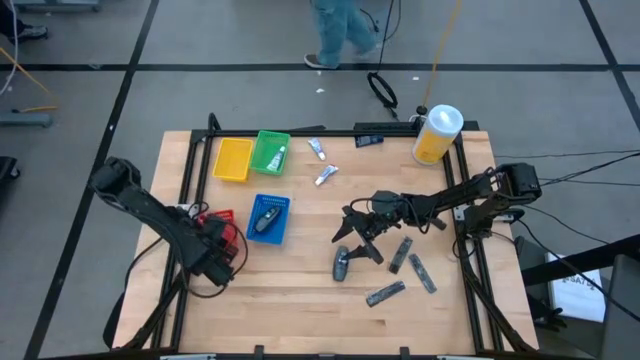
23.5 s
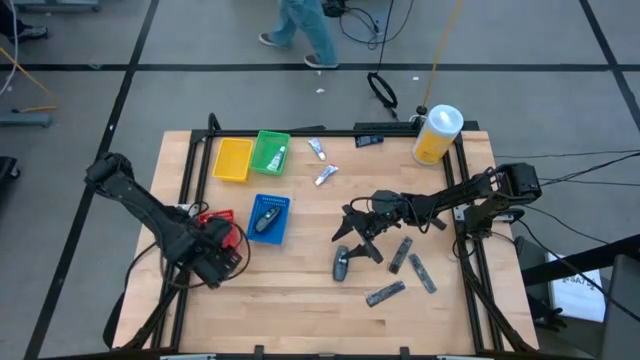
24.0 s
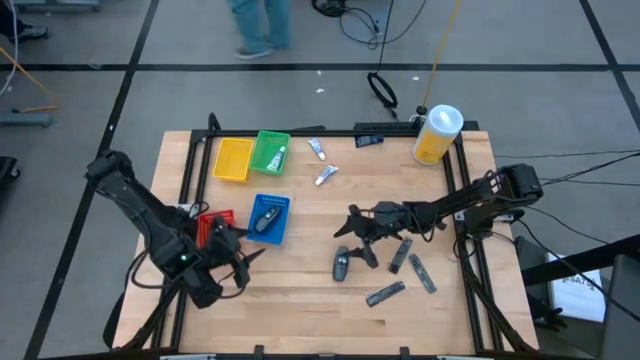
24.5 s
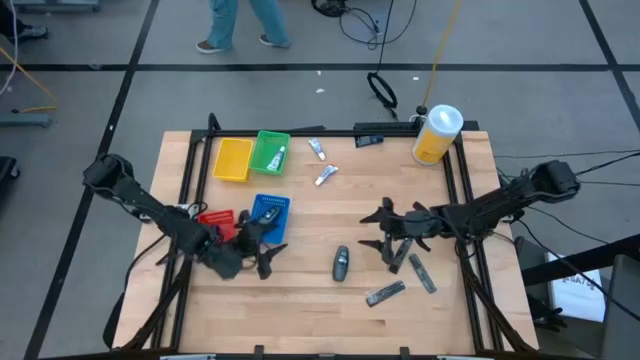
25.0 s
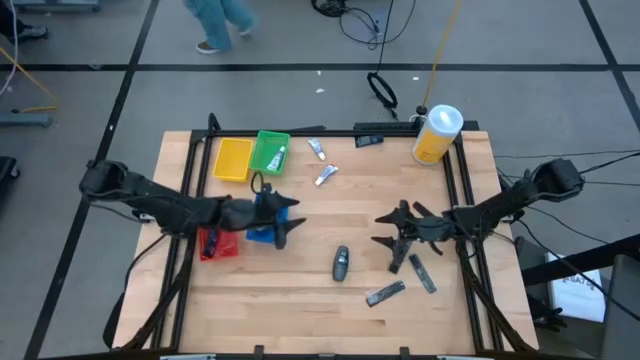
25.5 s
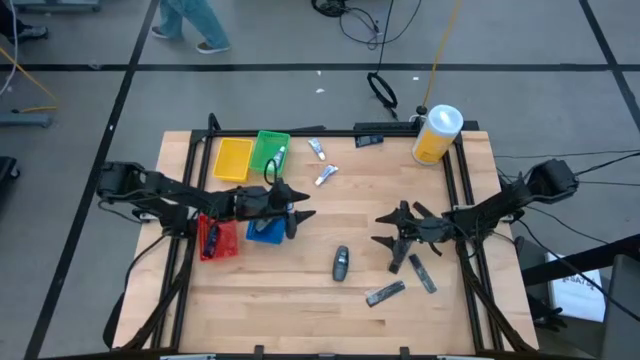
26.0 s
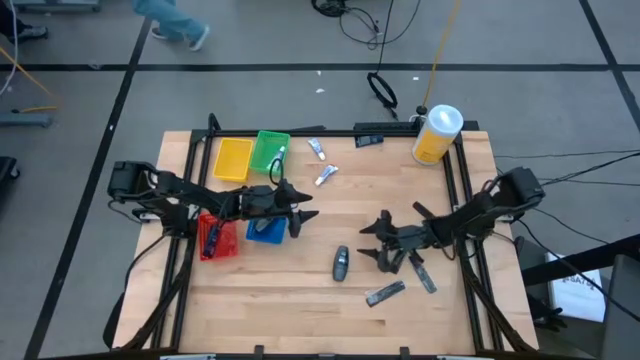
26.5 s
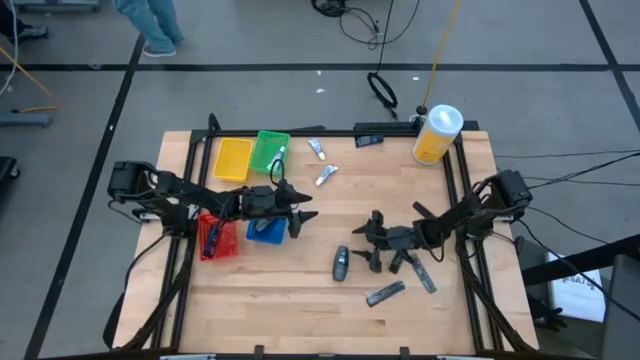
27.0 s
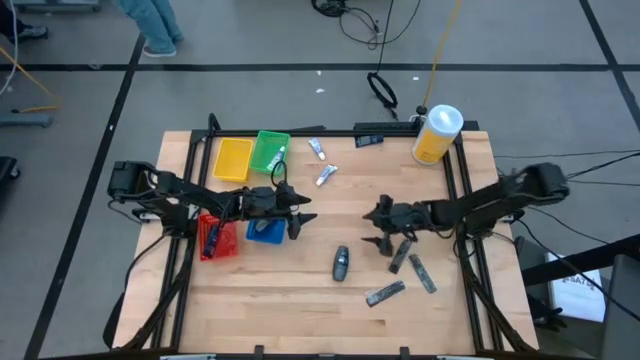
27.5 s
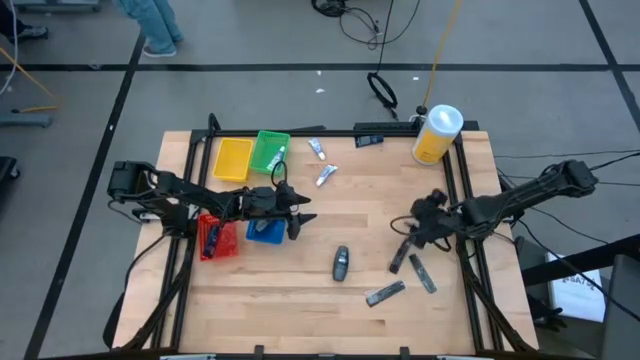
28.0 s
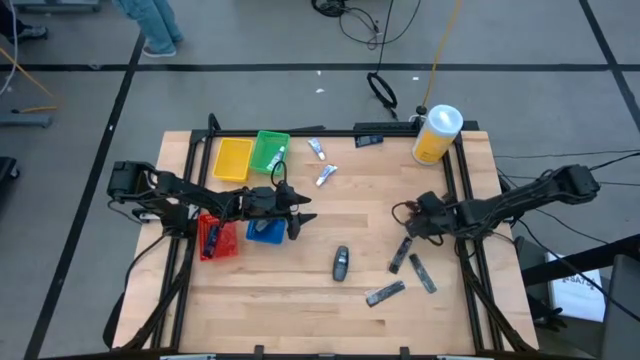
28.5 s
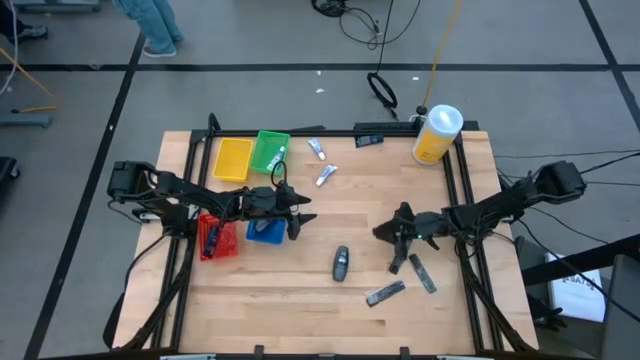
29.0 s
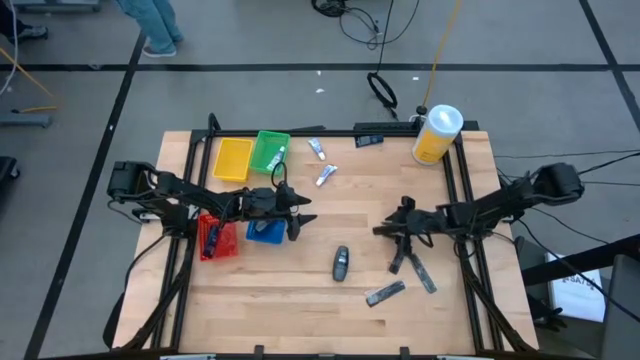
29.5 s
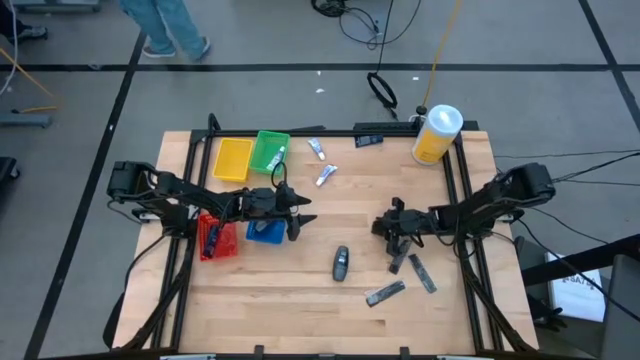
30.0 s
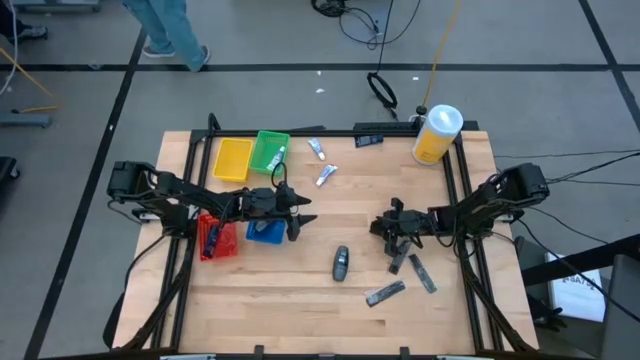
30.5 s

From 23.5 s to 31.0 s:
Task: Pick & Place Travel size toiletries
Put the black comb into the yellow bin

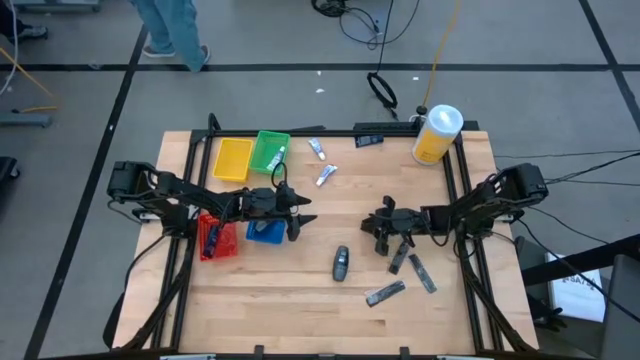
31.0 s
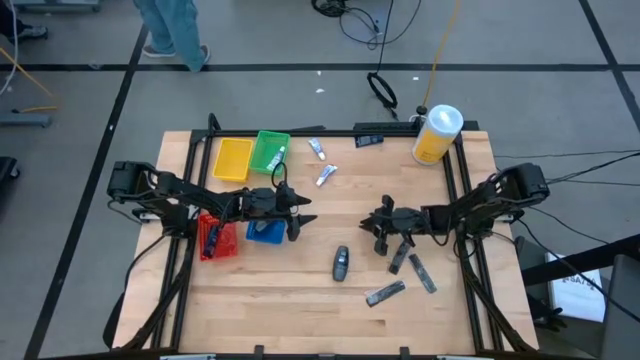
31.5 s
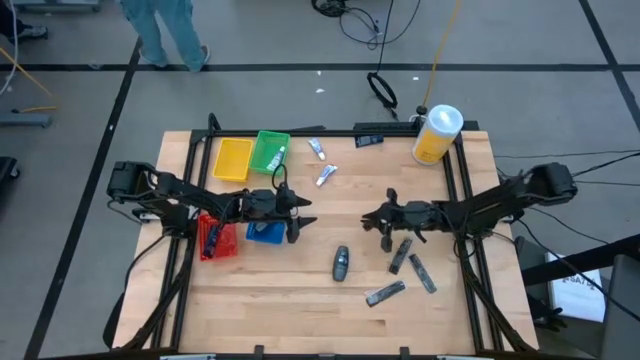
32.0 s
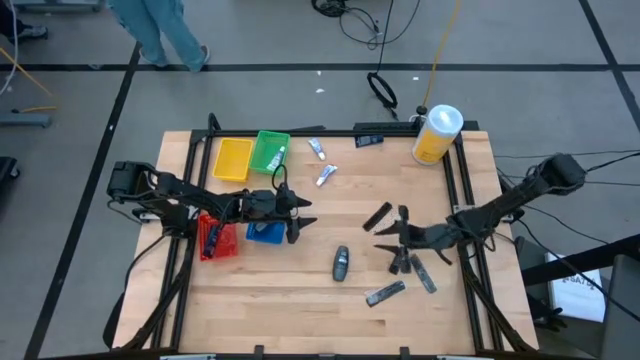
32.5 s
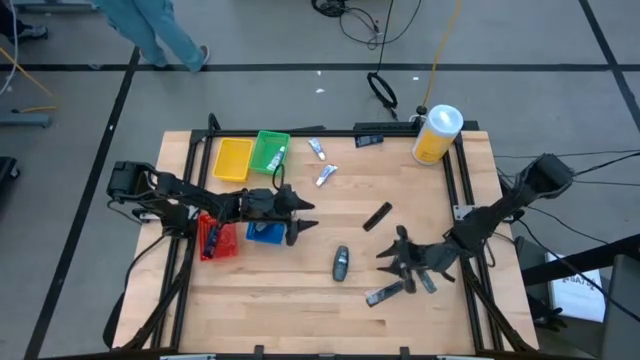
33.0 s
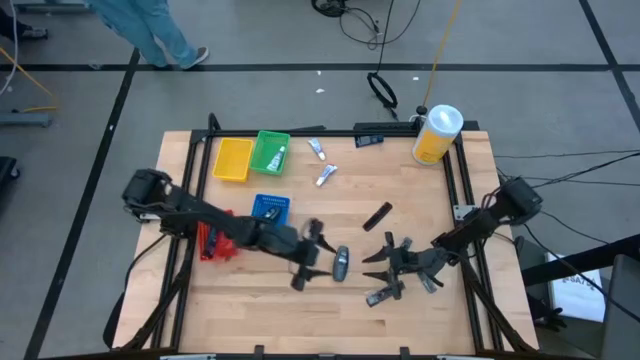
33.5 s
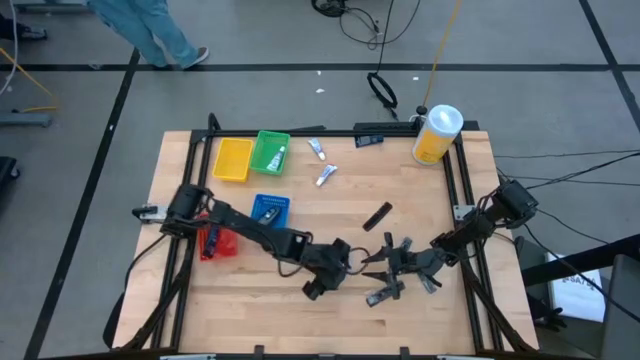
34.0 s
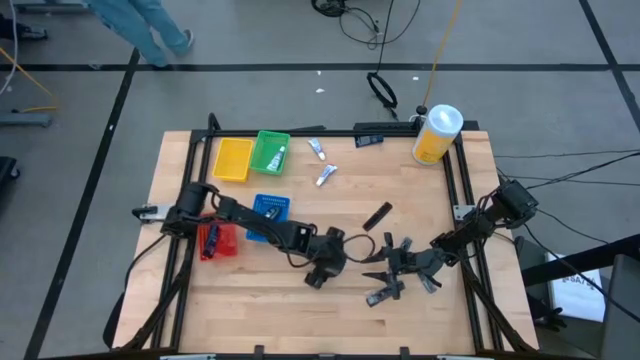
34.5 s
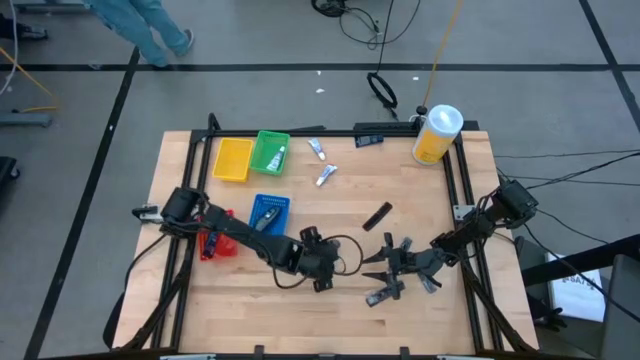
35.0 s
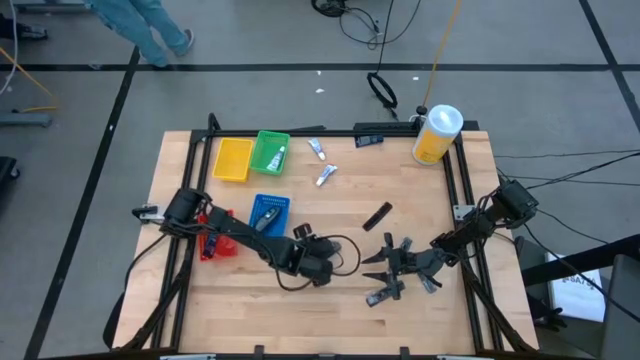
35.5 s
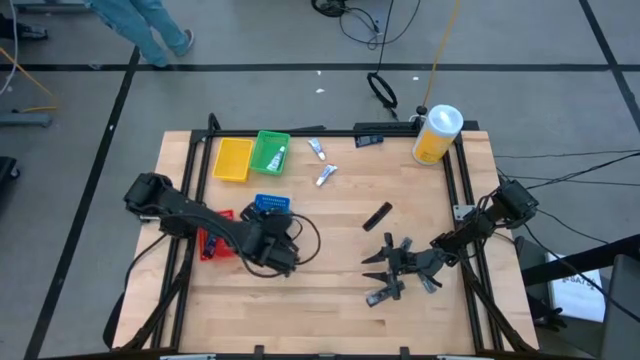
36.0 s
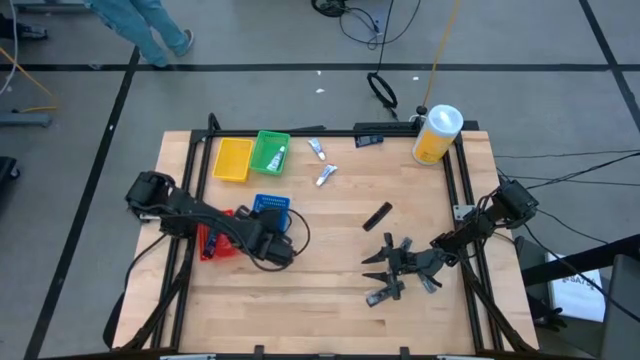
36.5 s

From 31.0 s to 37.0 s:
Put the gray deodorant into the blue bin

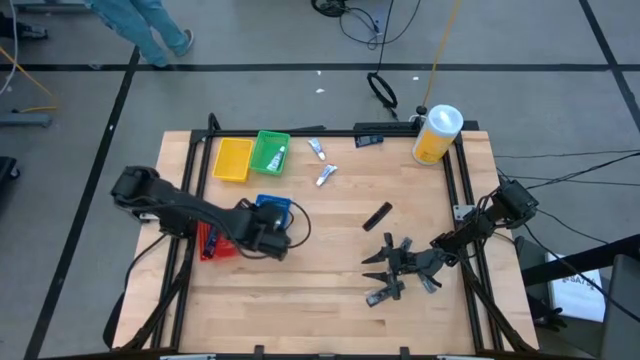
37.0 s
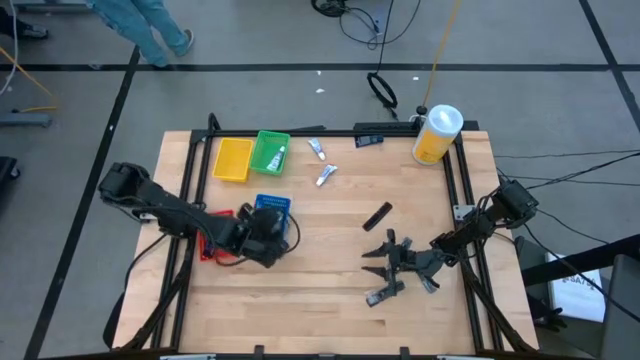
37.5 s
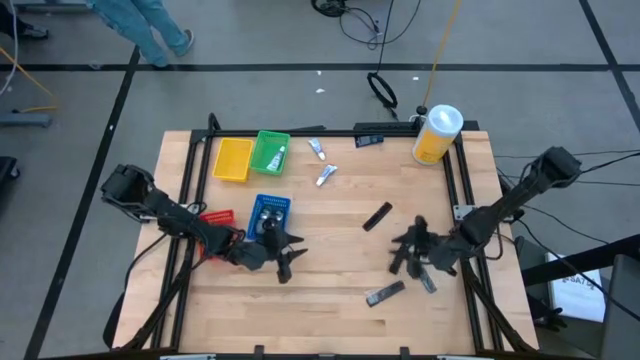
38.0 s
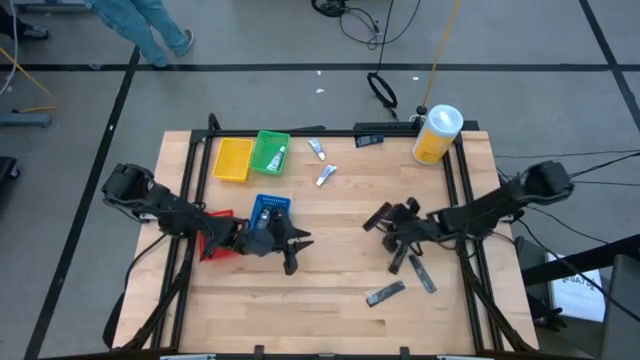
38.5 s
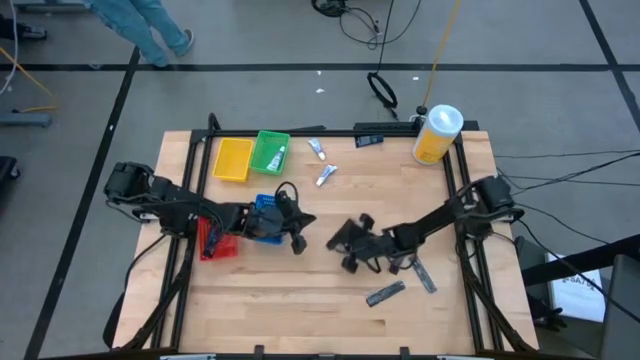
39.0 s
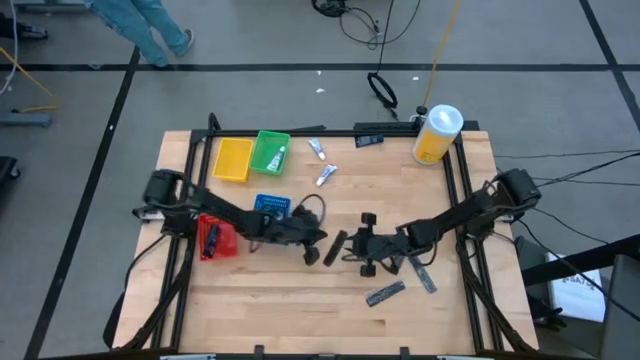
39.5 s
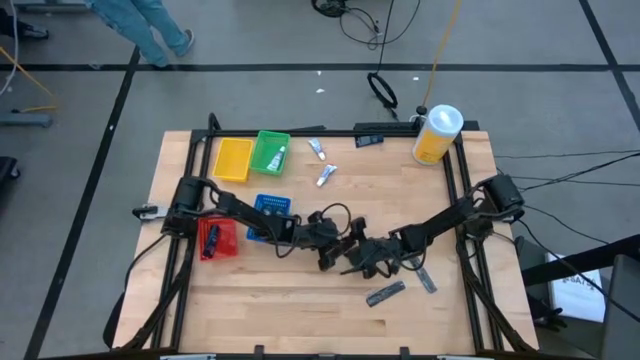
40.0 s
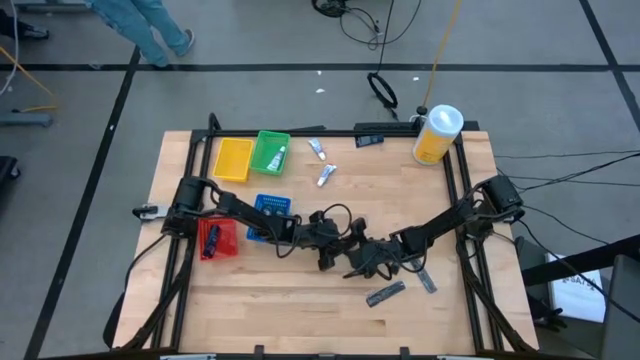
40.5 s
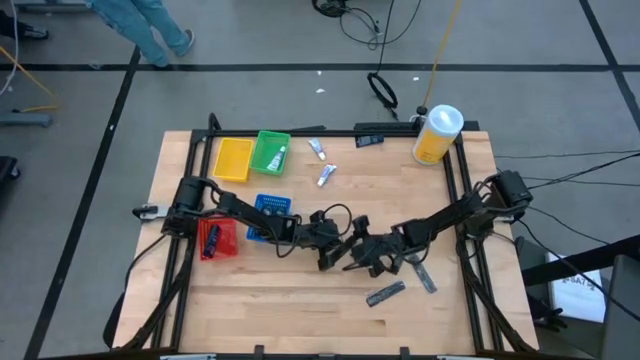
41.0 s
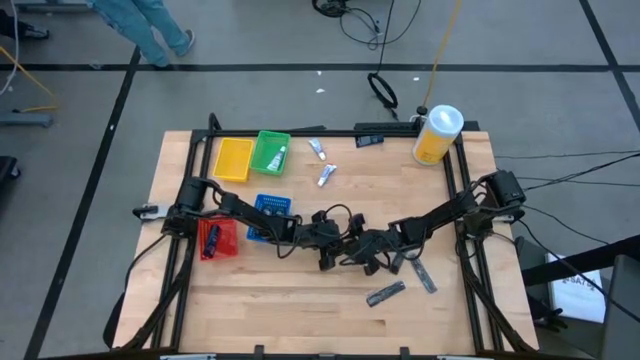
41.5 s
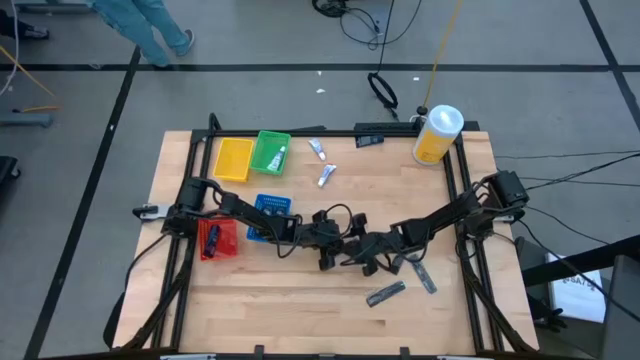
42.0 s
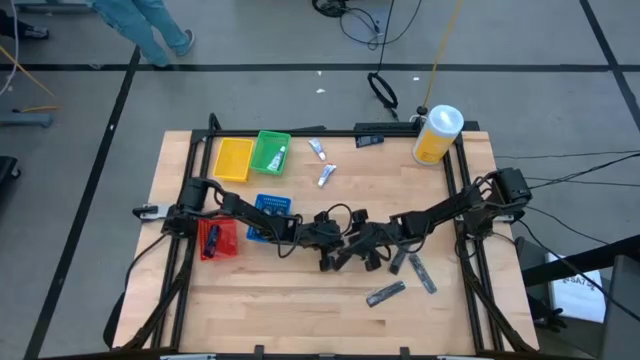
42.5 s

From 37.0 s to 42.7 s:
Put the black comb into the yellow bin

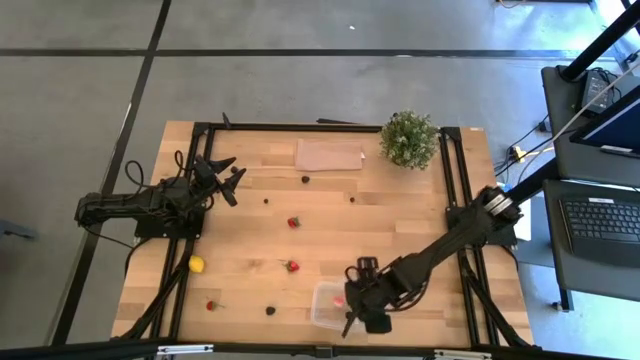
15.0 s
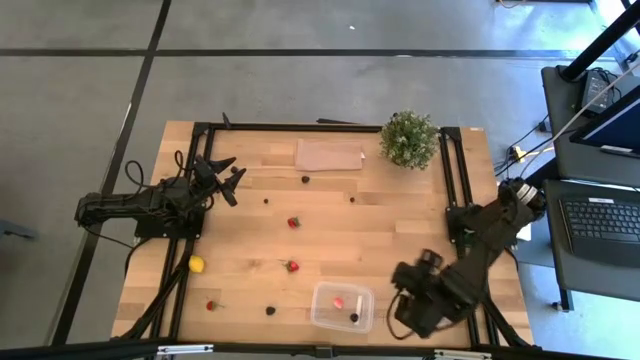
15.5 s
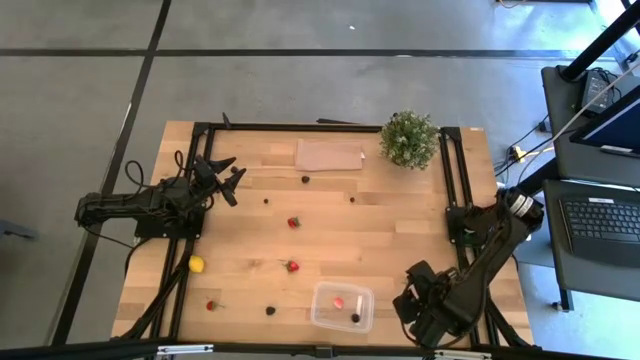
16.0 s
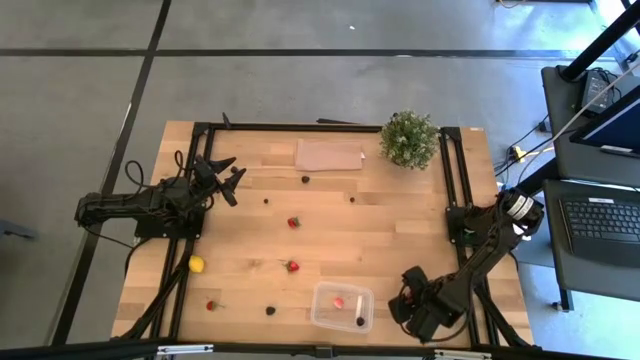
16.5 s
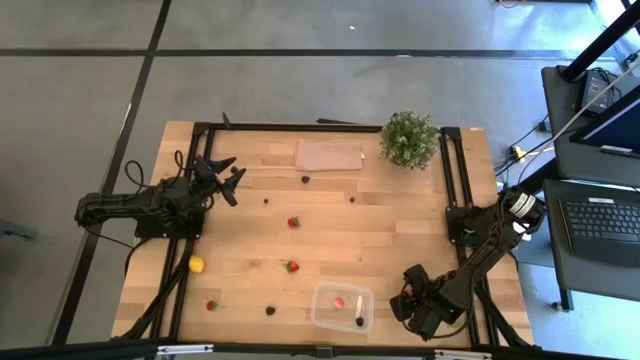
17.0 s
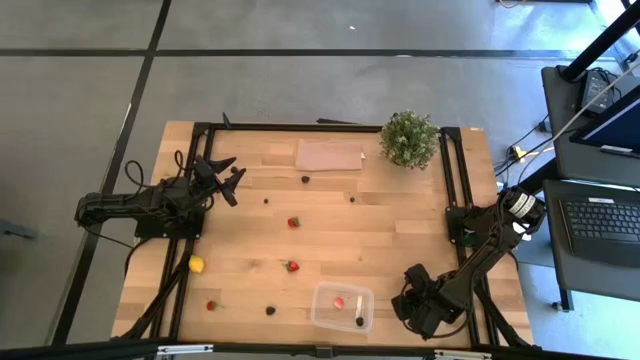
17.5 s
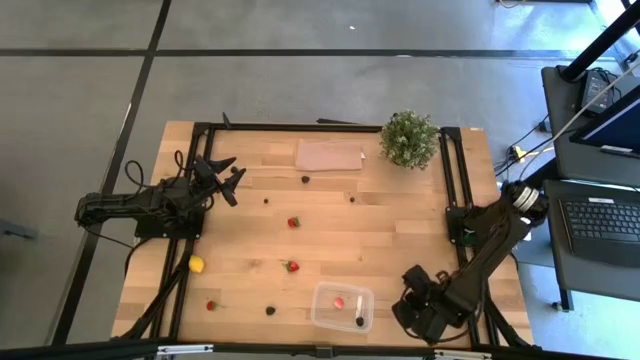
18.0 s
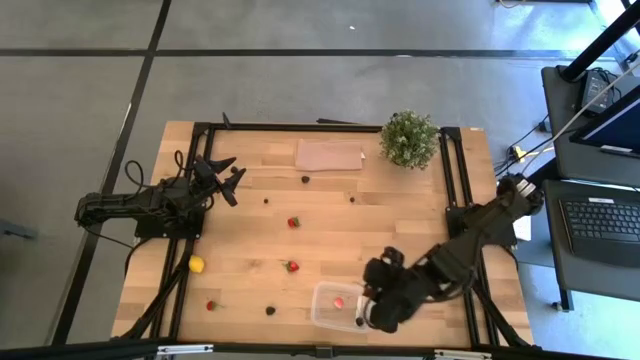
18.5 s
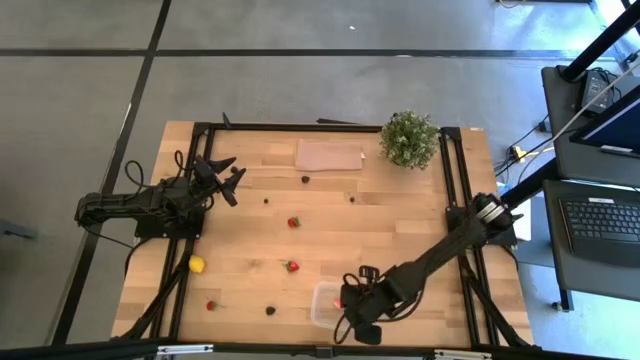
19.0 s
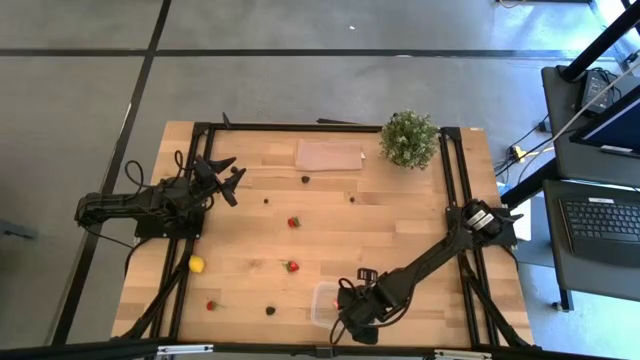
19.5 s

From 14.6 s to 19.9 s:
Task: Pick and placing Produce into tupperware
Put the red cherry into the transparent container
